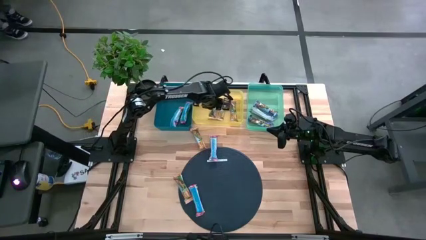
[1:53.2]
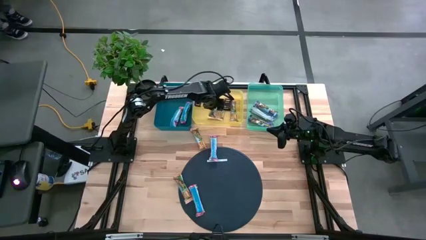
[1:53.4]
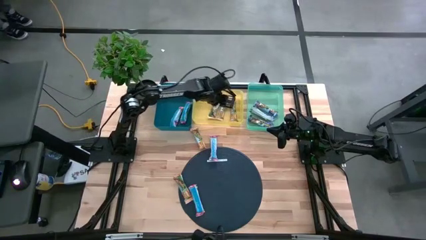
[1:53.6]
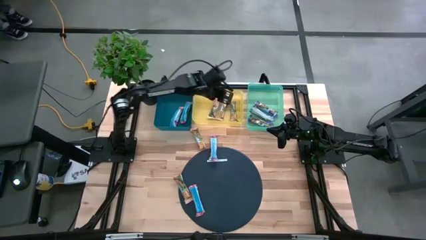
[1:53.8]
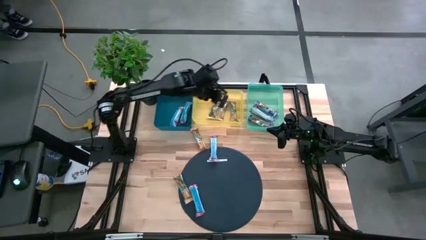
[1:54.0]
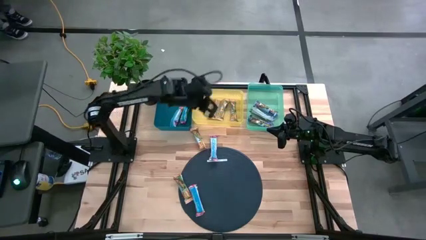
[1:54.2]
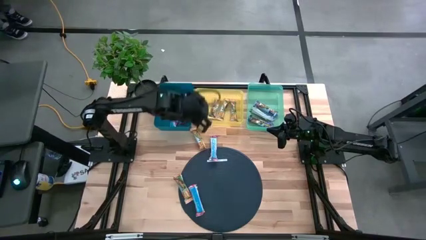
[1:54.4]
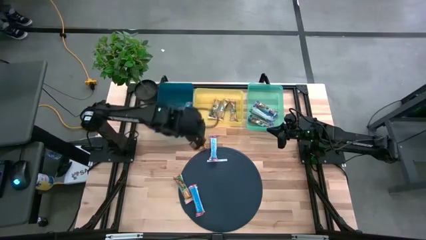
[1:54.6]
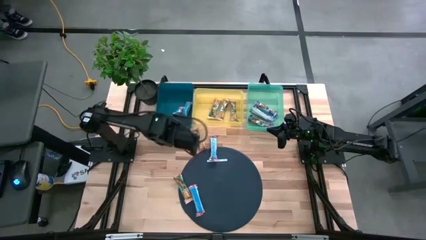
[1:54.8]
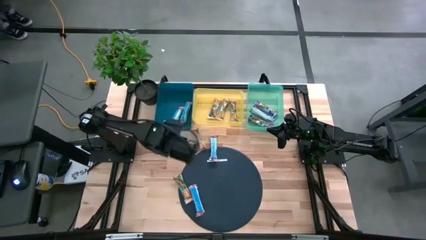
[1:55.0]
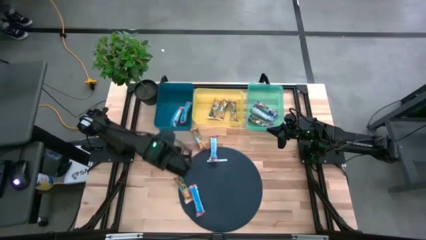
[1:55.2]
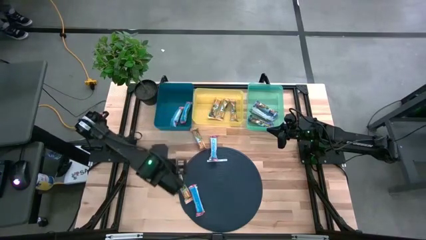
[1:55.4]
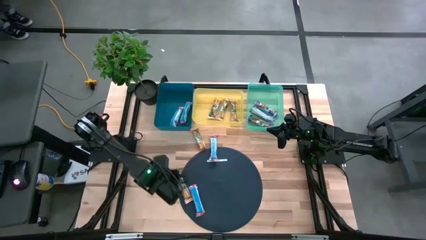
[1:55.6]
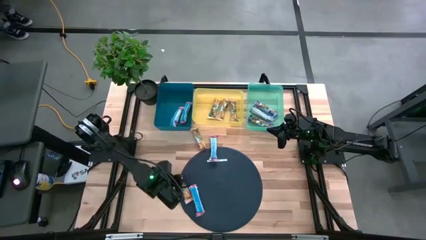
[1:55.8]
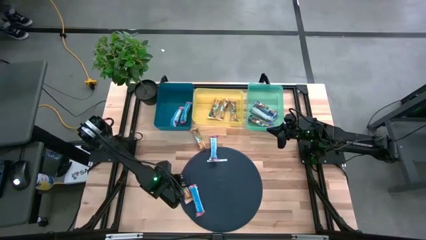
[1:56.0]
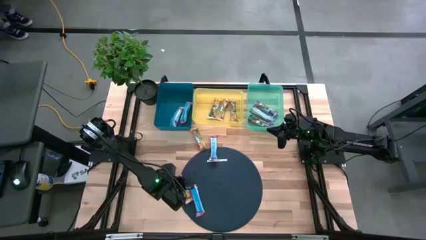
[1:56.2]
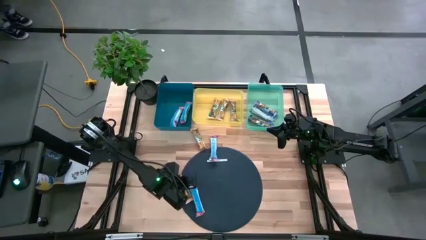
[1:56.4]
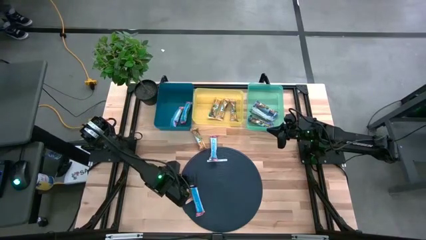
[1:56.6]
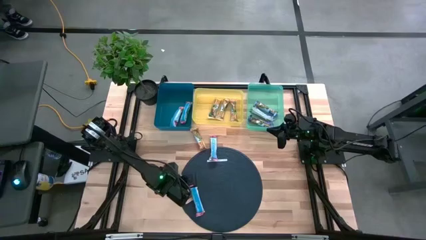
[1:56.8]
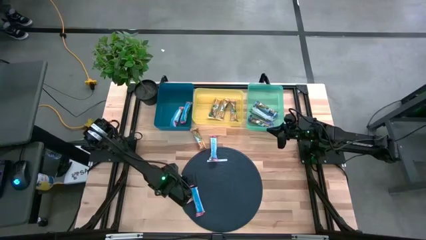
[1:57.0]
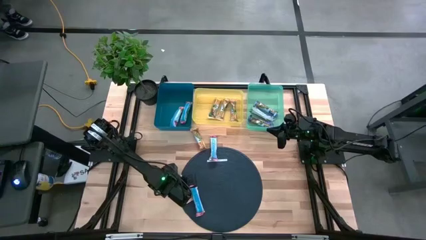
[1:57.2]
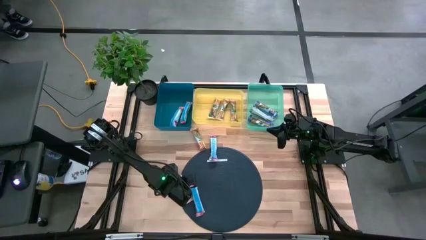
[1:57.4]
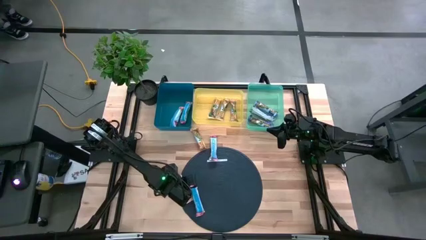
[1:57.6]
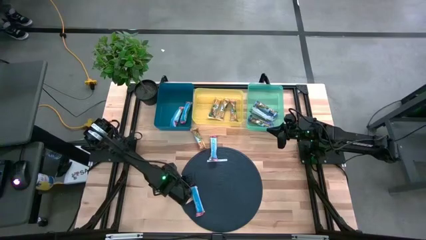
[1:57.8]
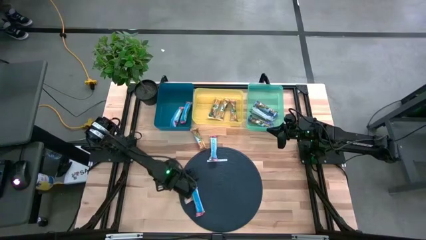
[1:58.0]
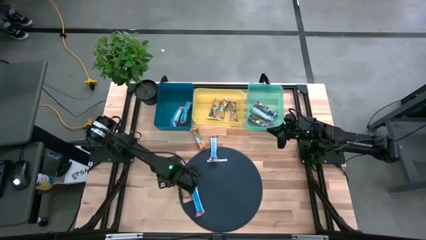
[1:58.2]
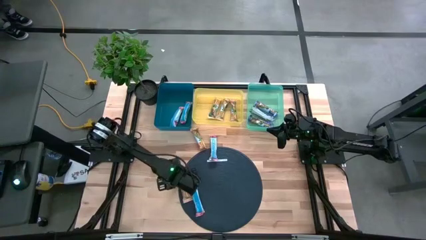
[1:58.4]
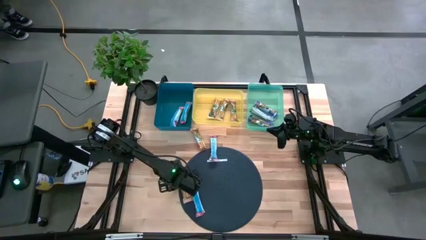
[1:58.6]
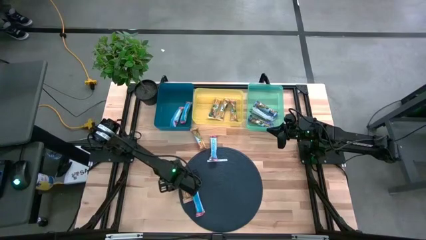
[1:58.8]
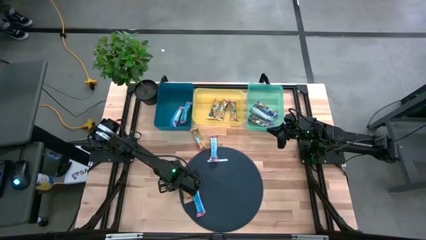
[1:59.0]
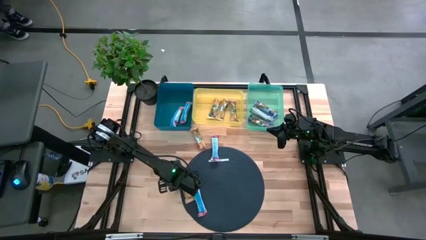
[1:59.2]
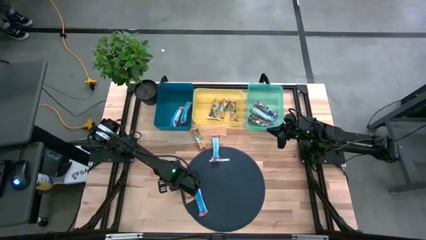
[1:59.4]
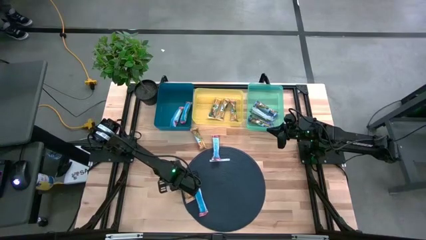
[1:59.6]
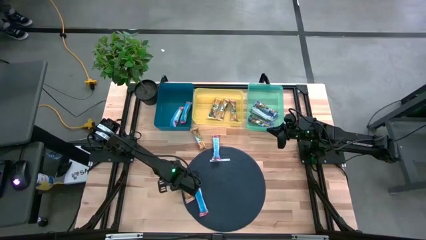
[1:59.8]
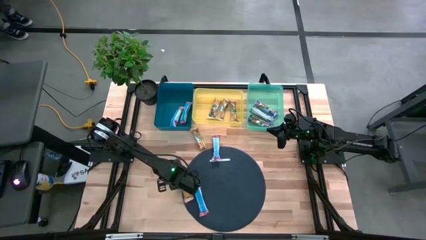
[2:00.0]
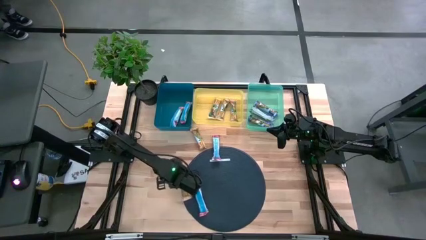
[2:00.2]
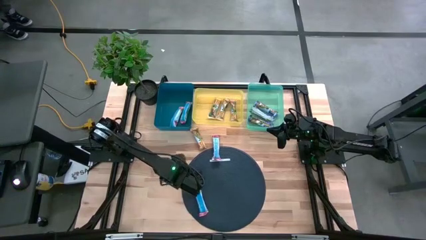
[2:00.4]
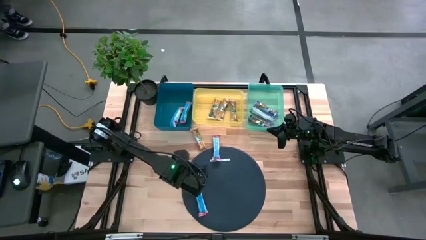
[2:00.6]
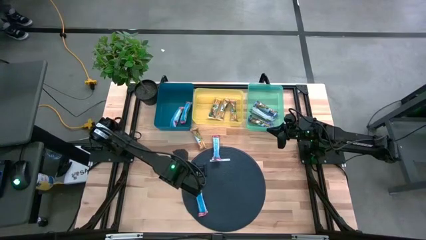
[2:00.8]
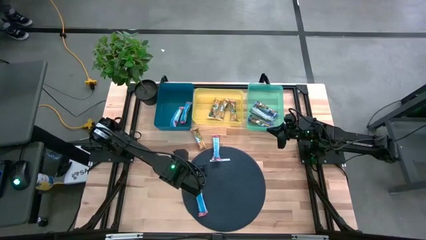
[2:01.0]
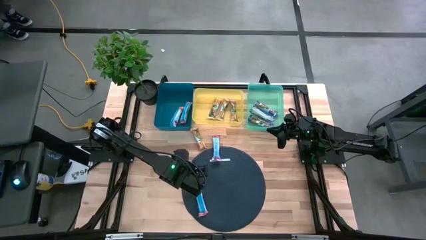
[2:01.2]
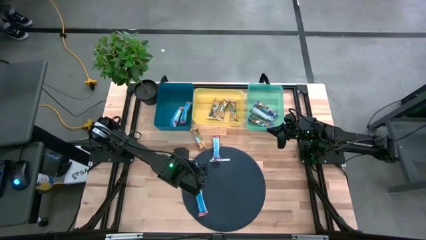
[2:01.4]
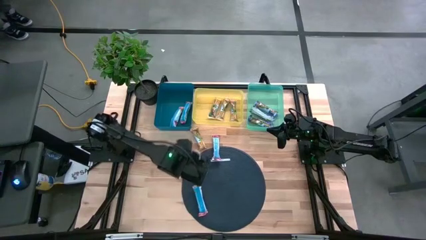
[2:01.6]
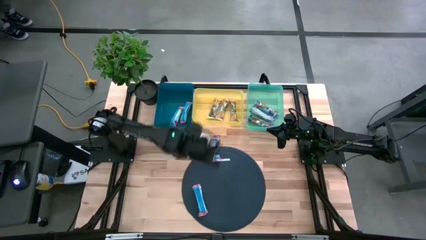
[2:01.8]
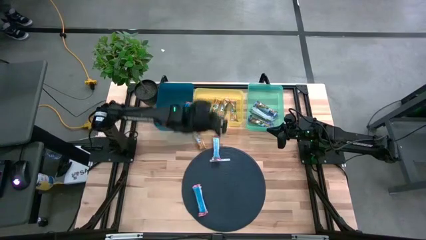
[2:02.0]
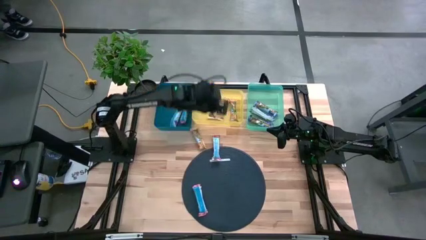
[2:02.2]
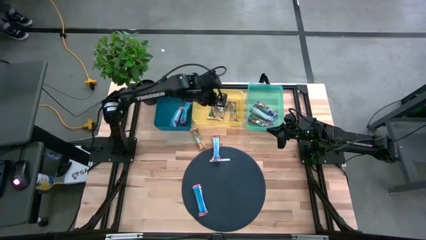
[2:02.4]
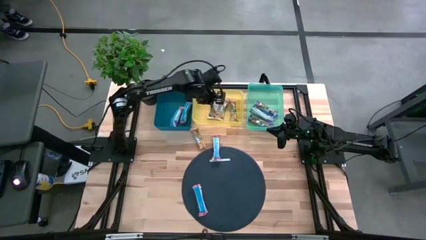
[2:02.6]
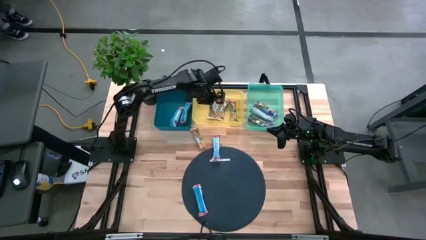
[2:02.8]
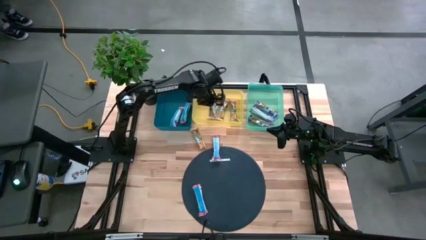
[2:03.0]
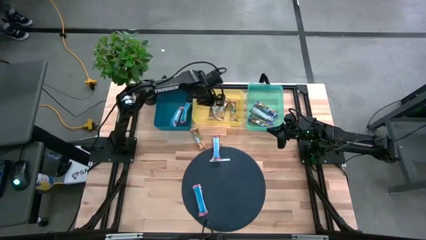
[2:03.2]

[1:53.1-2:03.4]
Task: Pick and place Granola Bars by type
Put the orange granola bar into the yellow bin

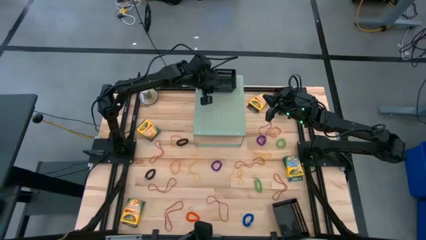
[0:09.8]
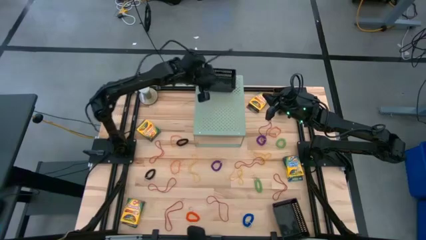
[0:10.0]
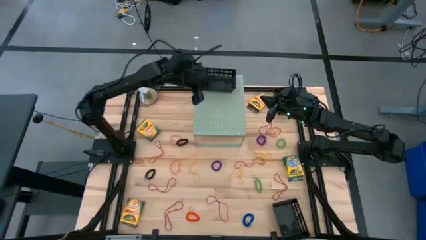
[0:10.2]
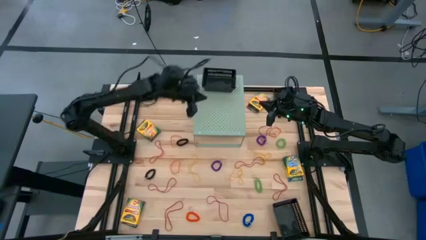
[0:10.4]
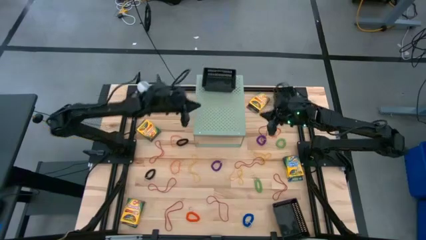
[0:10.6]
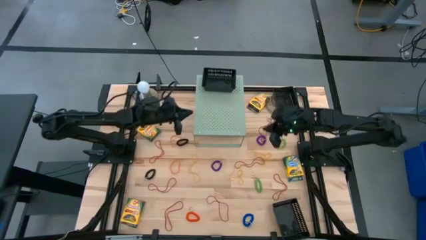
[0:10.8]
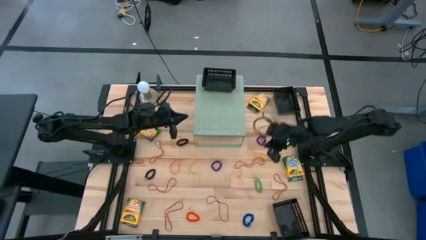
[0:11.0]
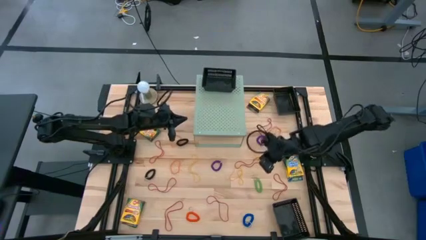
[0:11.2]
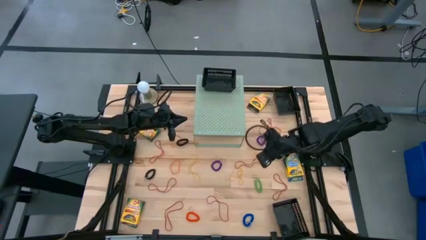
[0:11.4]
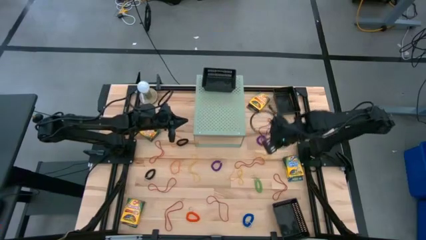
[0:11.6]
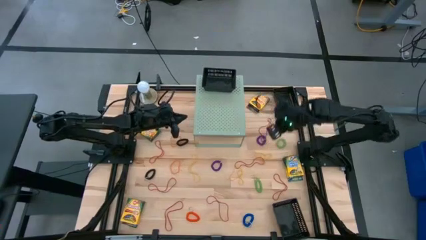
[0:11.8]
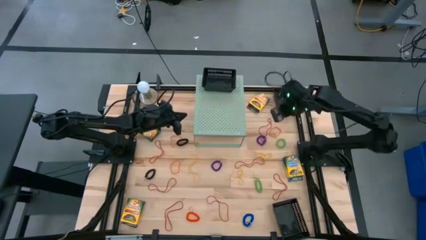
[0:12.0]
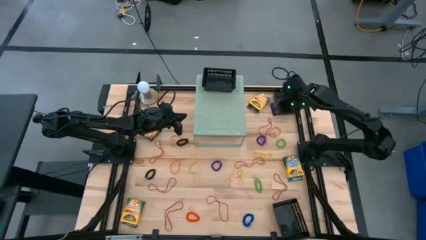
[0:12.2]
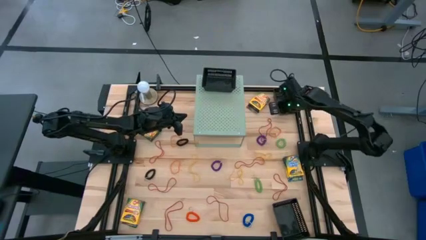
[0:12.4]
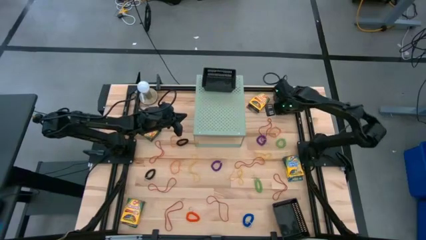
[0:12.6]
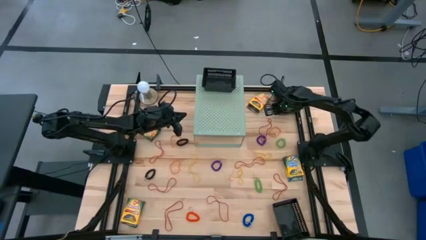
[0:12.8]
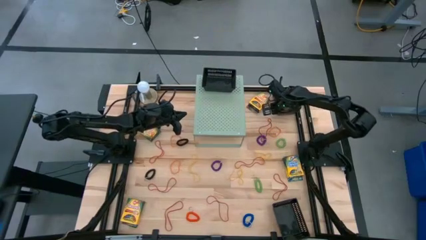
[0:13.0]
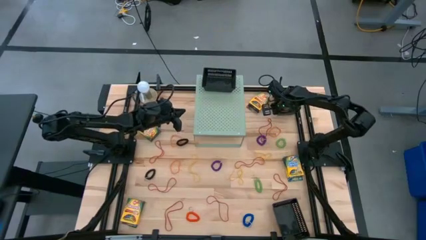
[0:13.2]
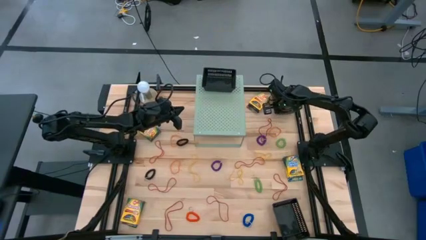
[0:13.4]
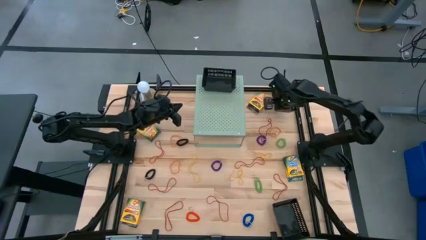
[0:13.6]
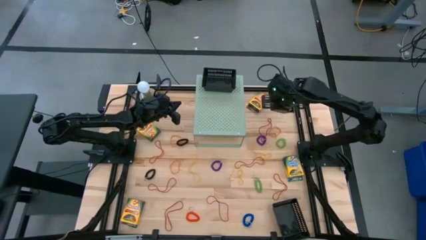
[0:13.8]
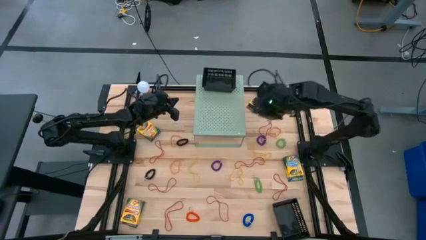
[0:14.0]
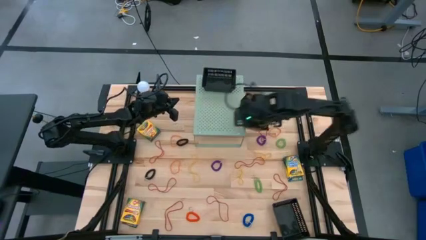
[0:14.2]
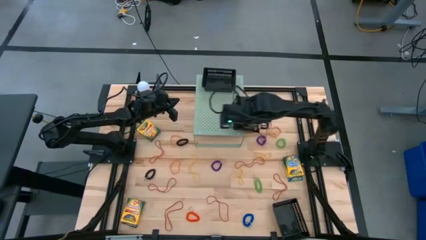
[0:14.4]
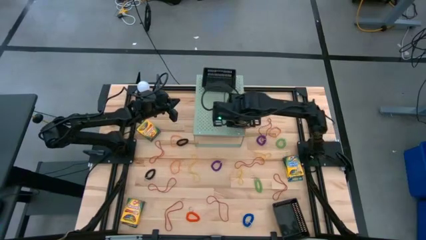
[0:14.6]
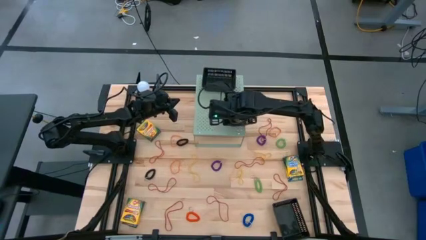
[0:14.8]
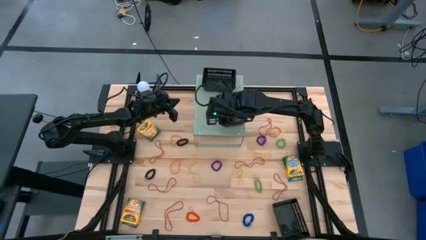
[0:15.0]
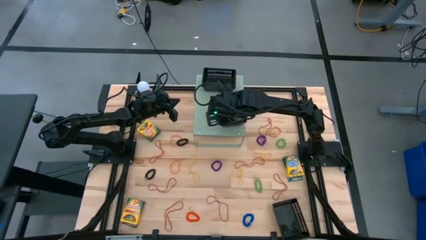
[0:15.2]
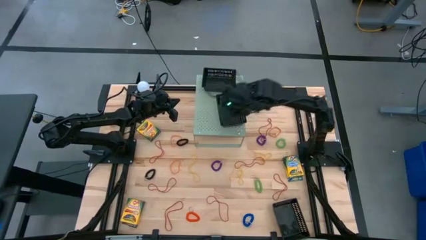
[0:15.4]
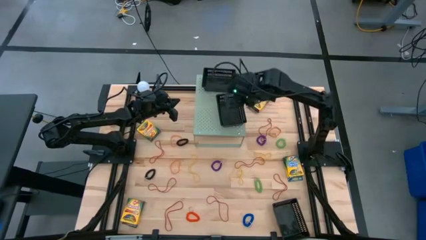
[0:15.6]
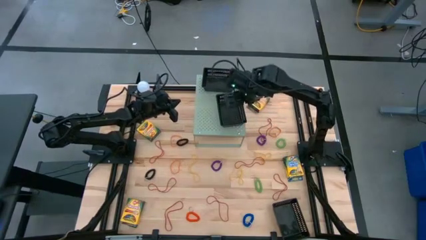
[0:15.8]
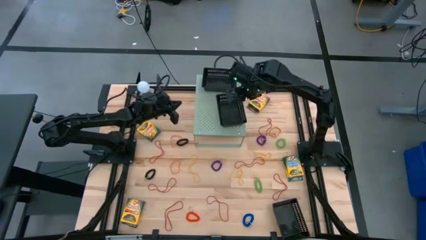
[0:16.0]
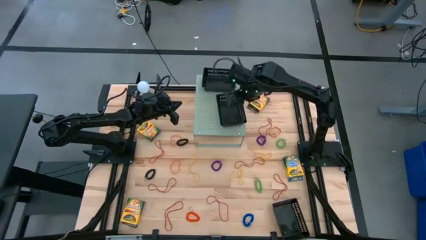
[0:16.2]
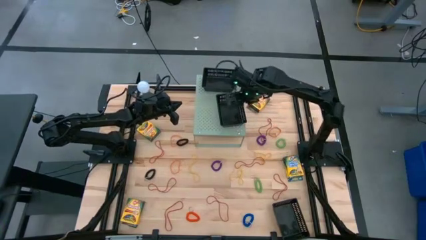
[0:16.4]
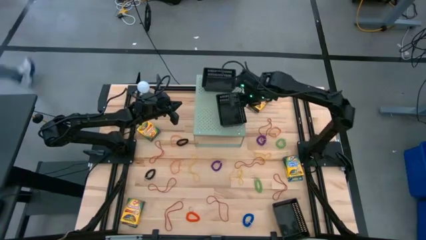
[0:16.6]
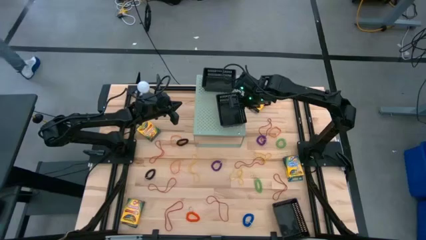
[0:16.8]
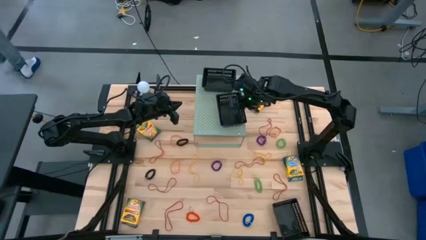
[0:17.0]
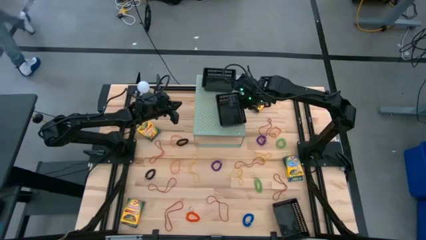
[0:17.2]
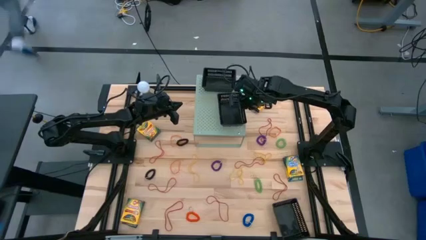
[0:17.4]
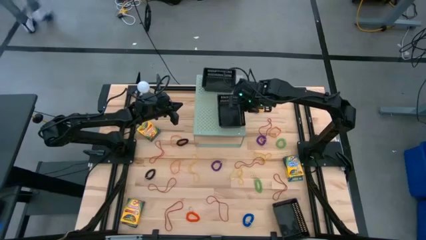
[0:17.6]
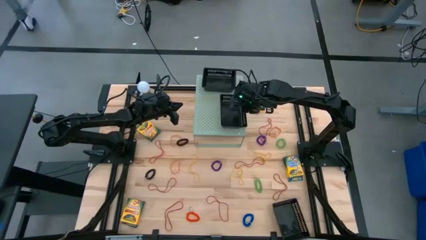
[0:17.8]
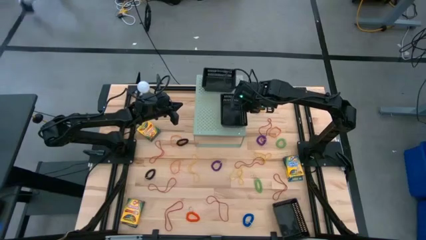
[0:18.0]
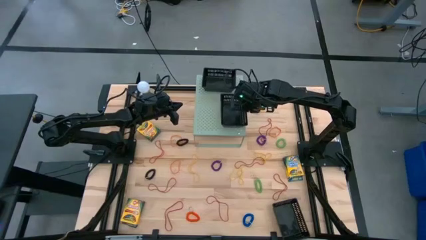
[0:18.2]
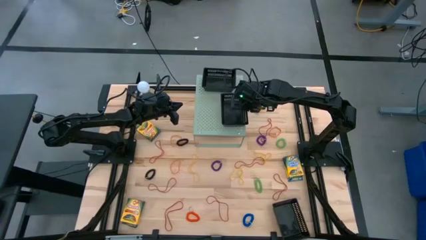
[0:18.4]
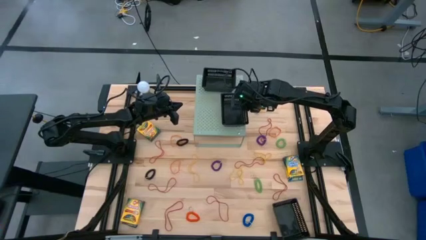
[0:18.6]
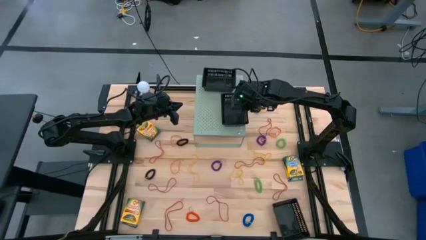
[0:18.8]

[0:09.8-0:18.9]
Task: Pick & Place Office Desk Supplies
Put the top black bin on the shelf
